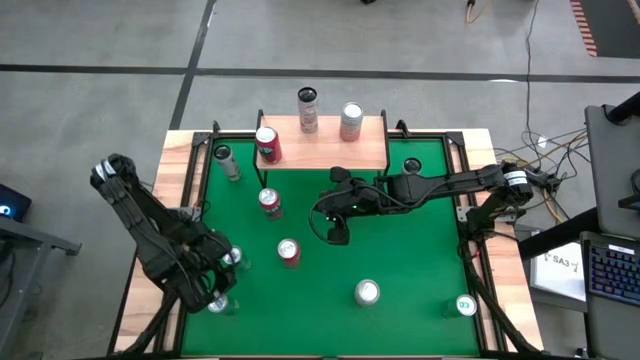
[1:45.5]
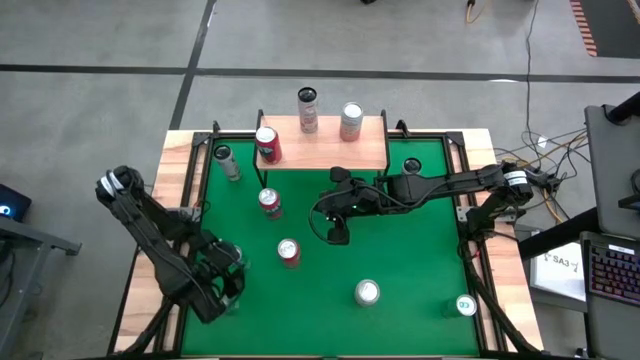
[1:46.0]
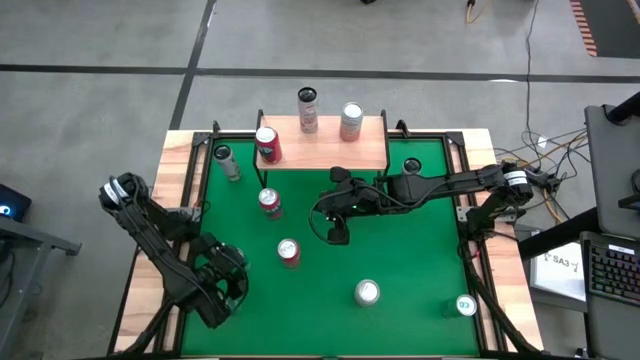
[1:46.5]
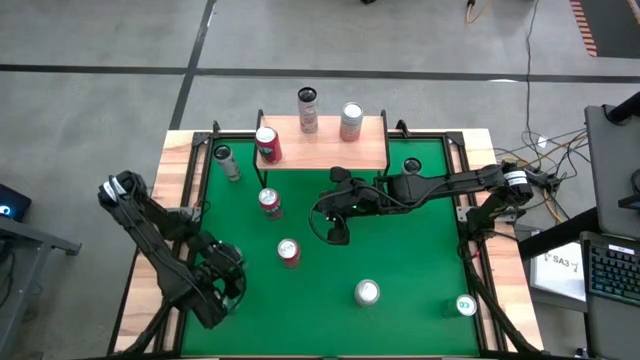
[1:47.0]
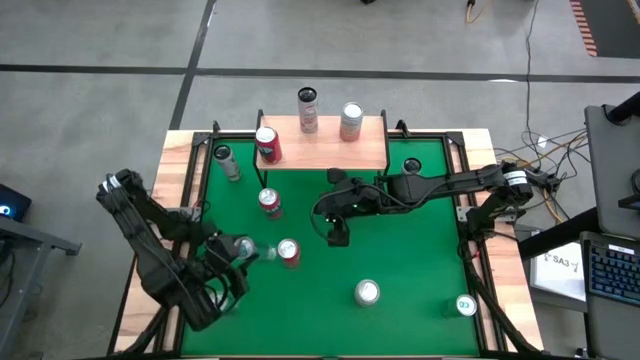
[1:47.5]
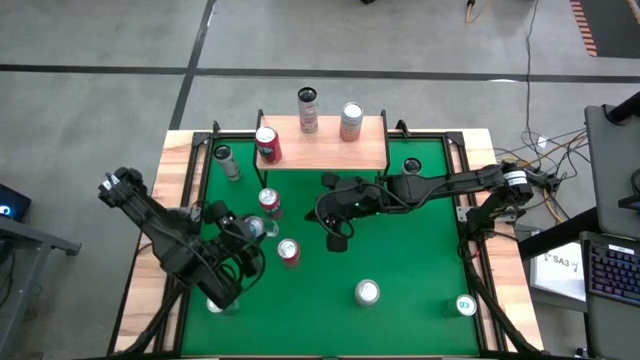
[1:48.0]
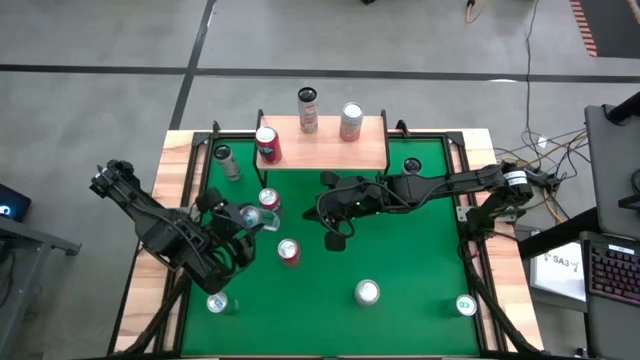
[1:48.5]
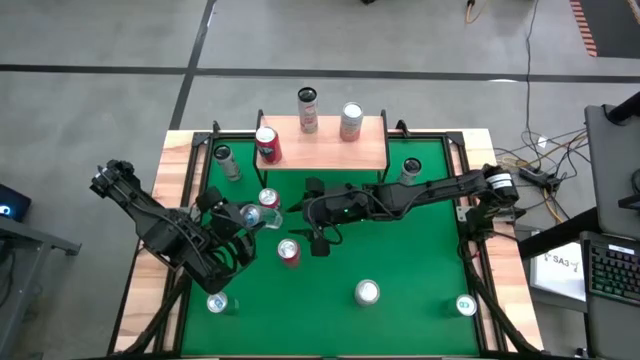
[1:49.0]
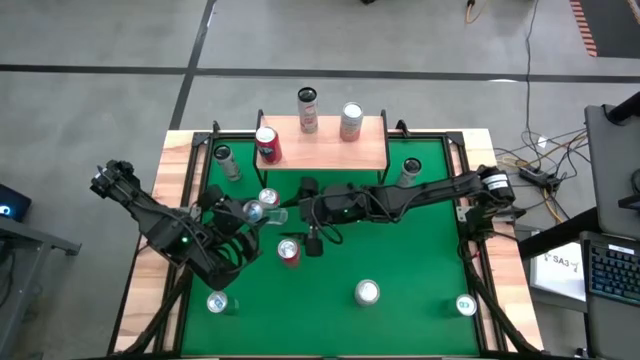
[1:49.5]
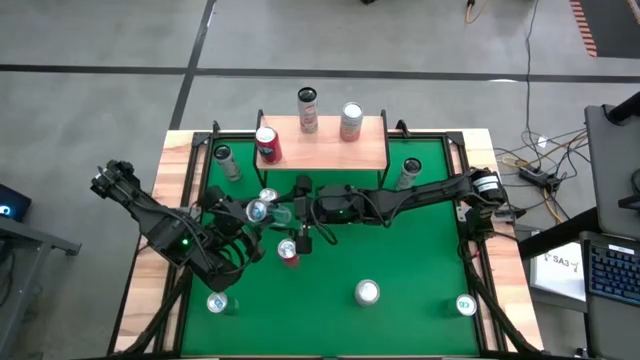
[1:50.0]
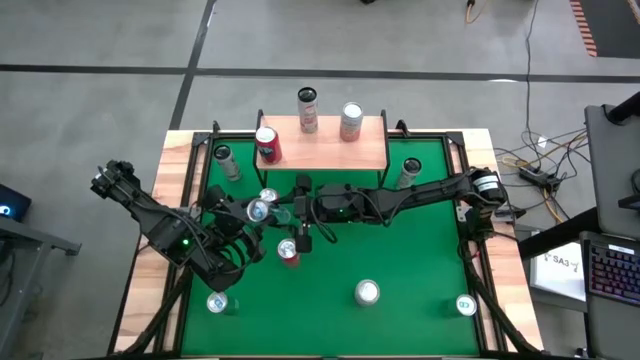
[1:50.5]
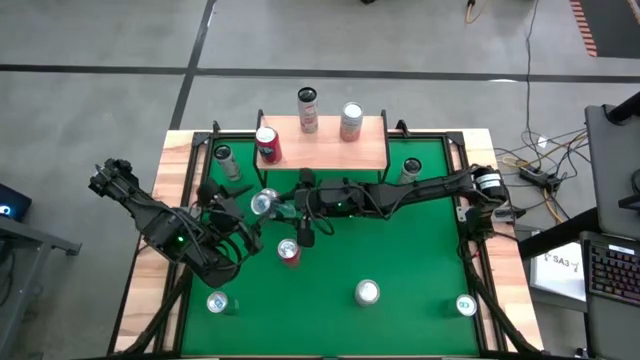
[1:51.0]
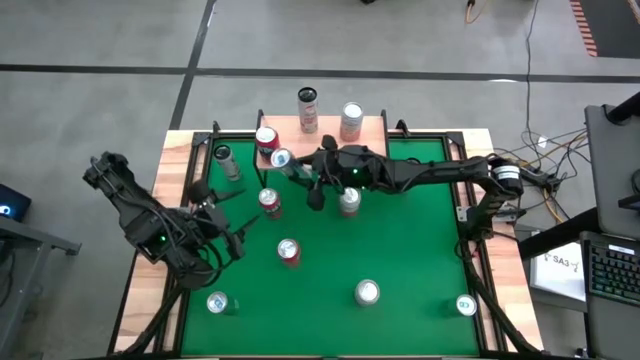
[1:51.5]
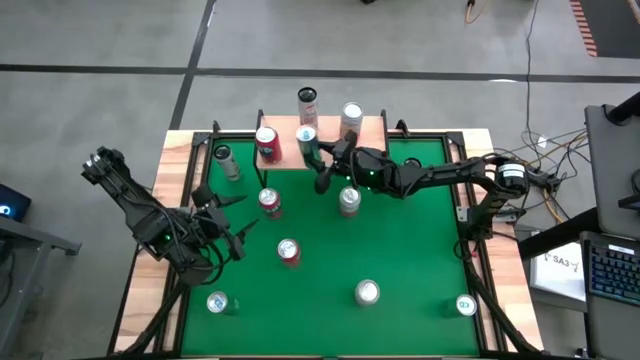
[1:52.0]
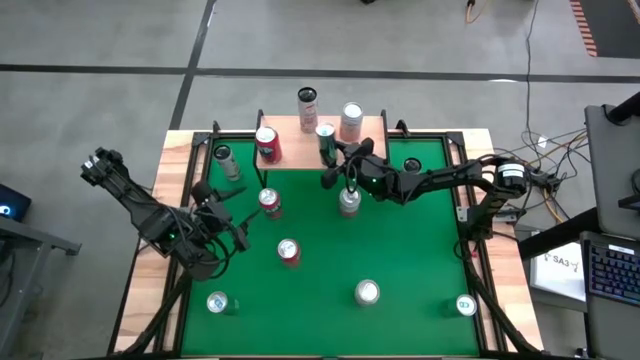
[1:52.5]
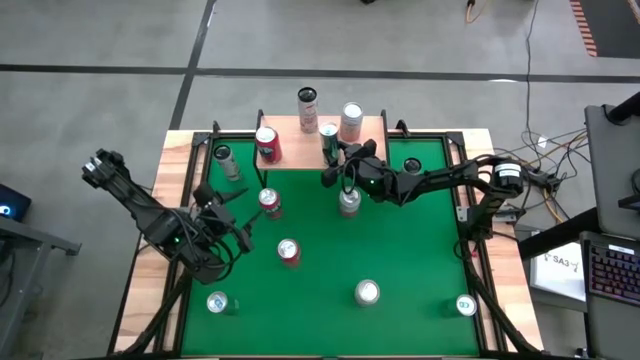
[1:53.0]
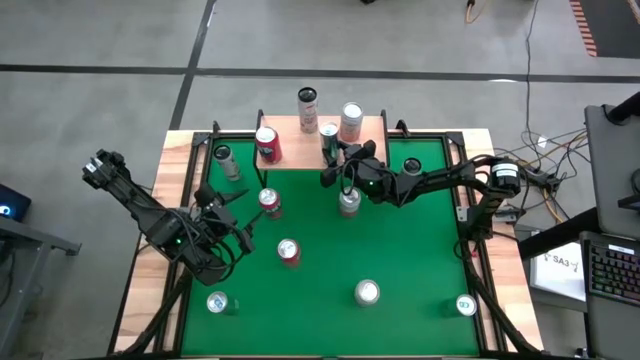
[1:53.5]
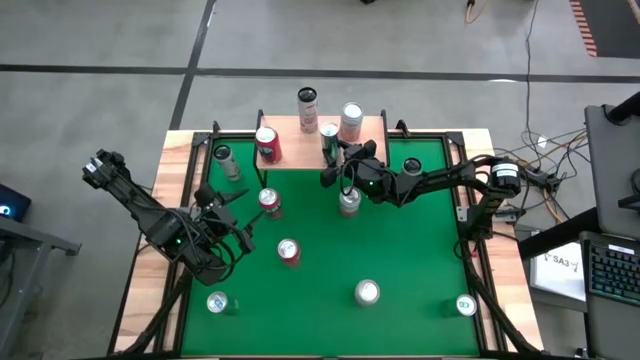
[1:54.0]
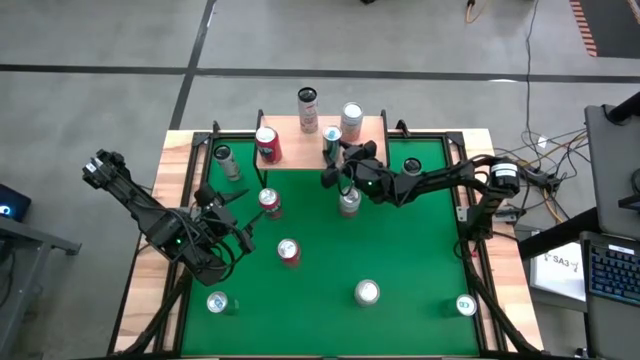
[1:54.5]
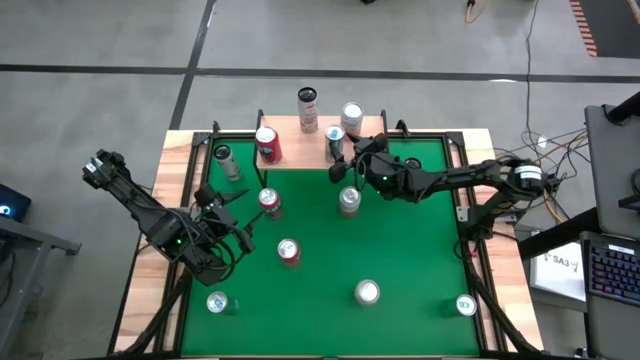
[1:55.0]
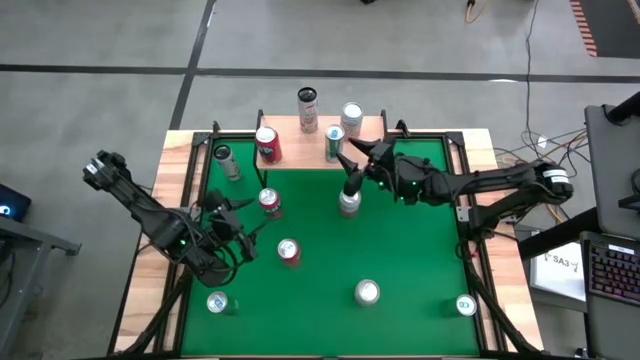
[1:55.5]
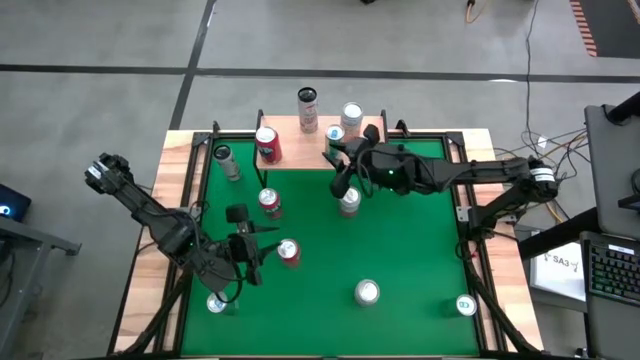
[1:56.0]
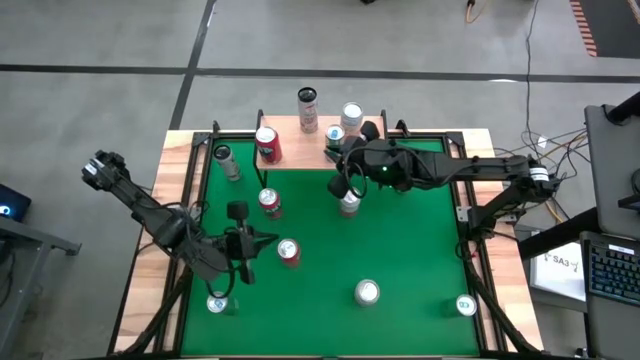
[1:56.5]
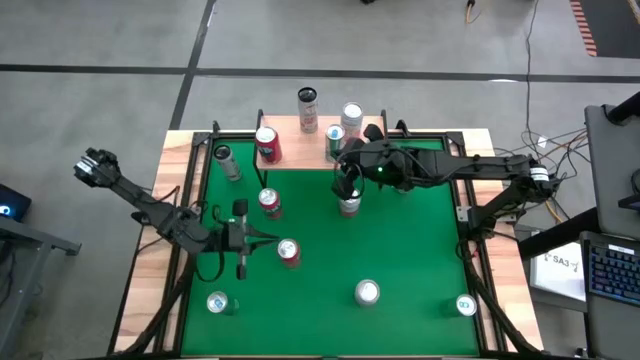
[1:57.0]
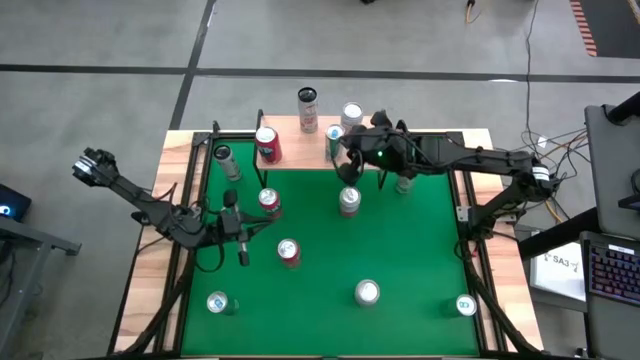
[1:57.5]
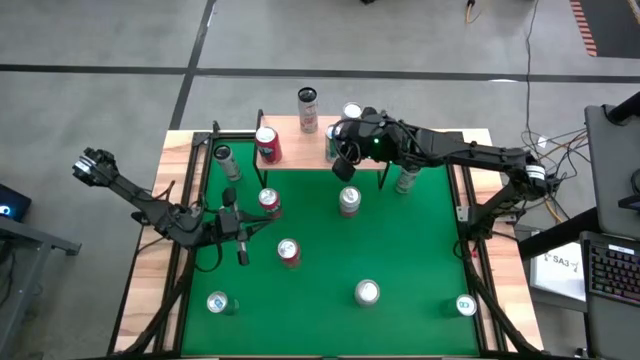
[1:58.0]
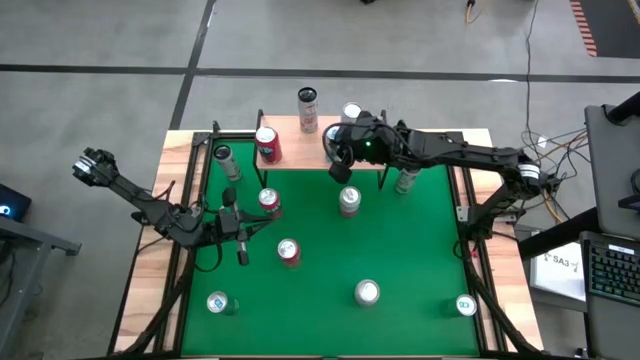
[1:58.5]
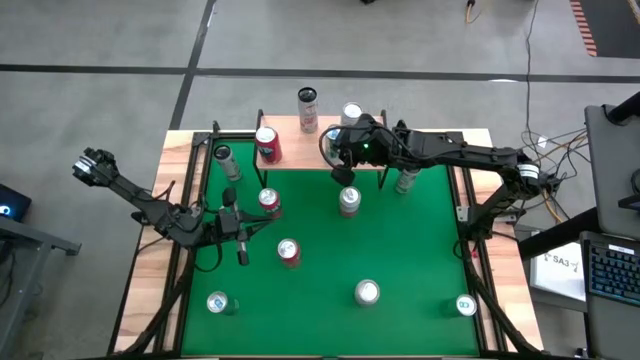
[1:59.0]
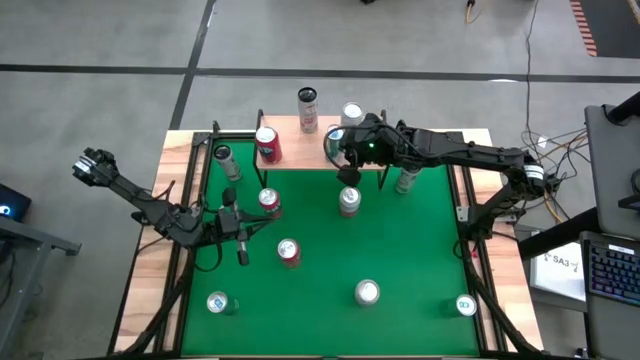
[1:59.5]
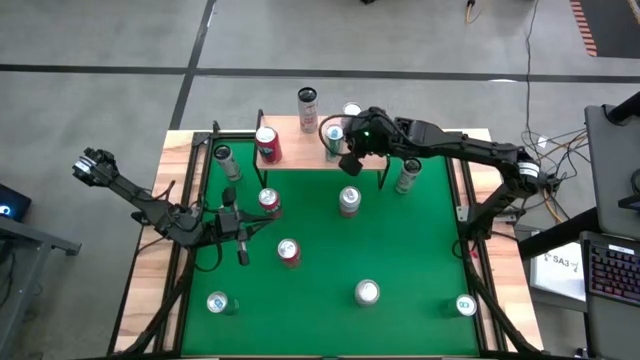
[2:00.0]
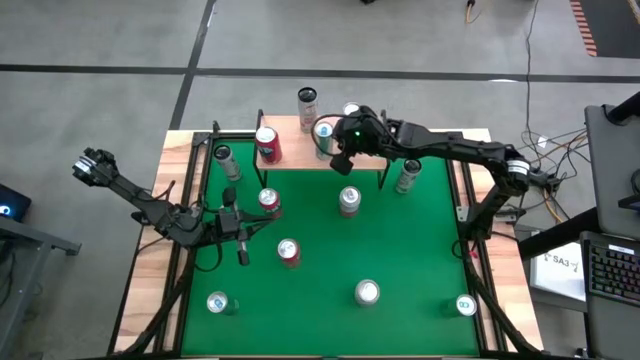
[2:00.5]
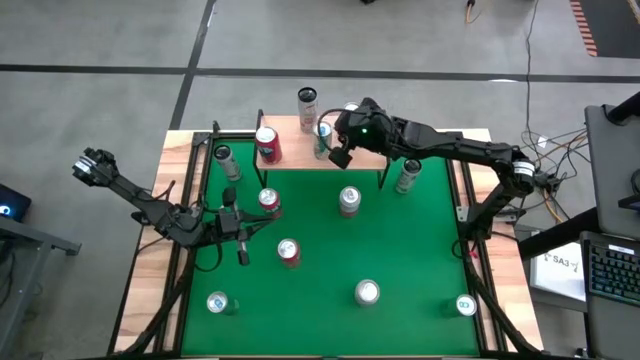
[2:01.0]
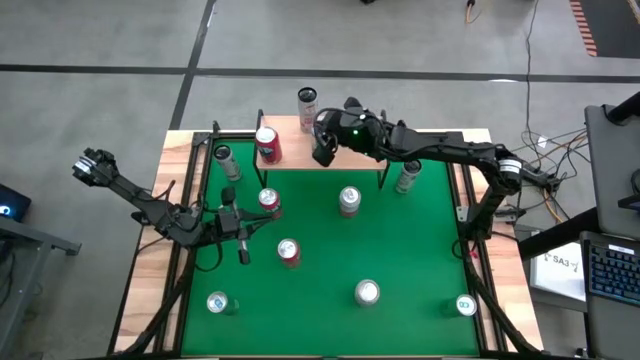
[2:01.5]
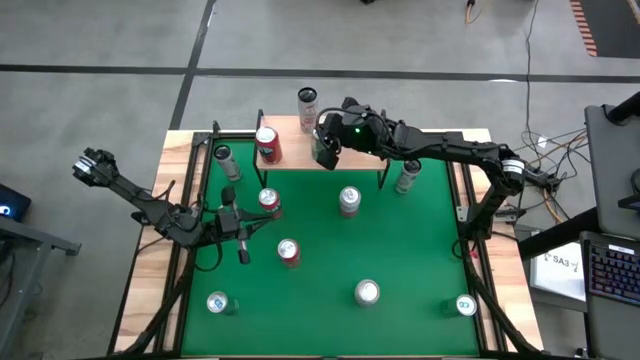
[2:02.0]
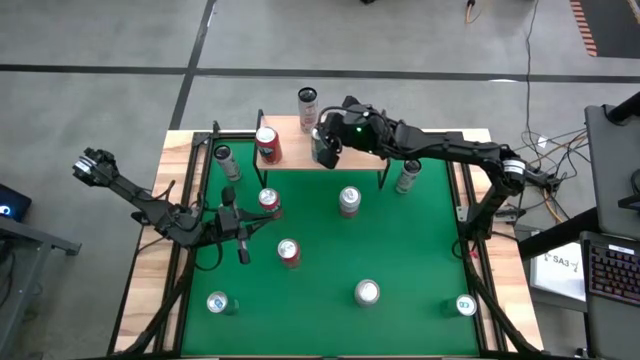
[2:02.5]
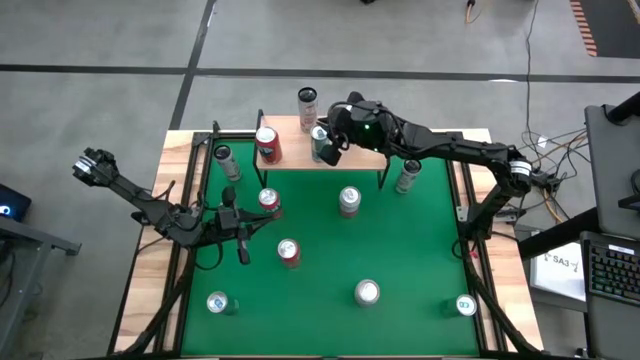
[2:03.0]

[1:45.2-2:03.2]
Task: Place canned beverage on shelf
Put the top left blue soda can on the shelf

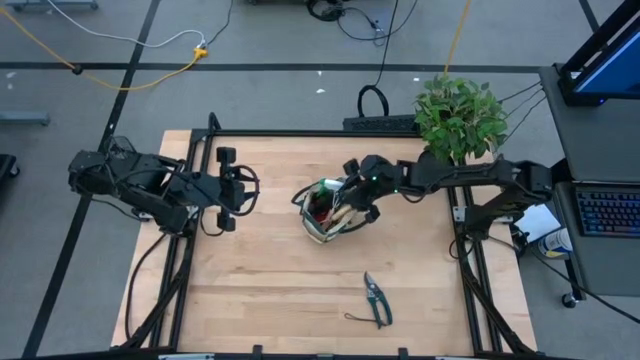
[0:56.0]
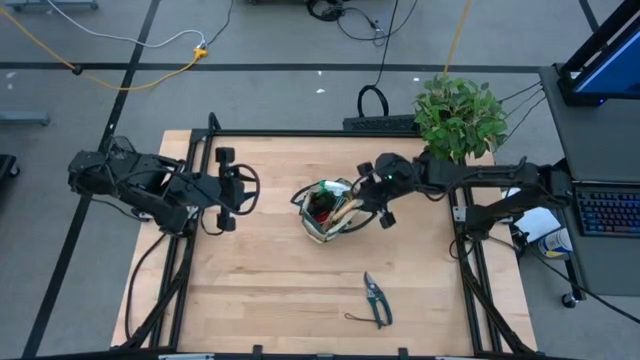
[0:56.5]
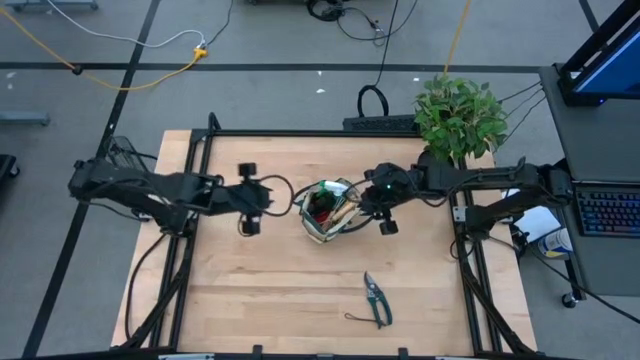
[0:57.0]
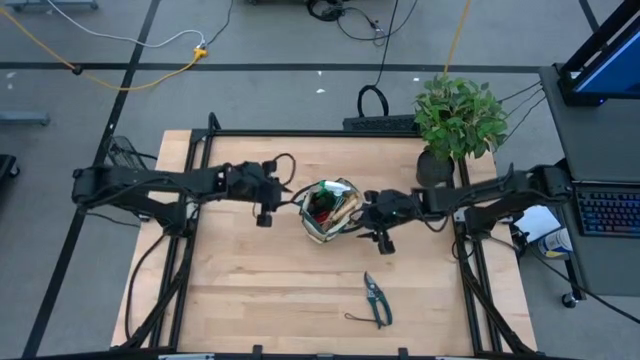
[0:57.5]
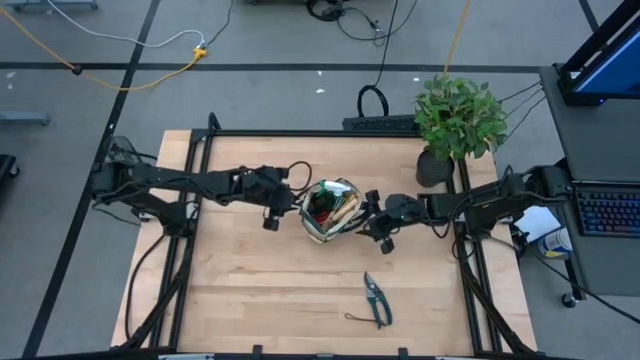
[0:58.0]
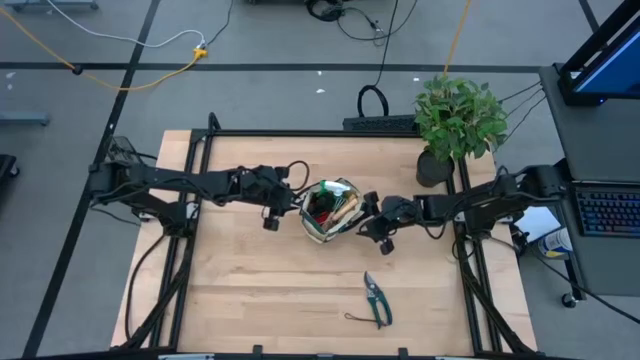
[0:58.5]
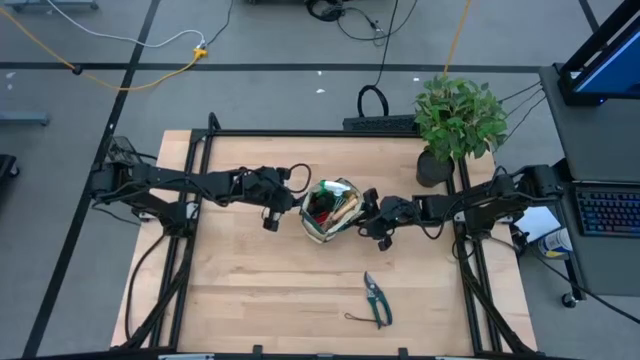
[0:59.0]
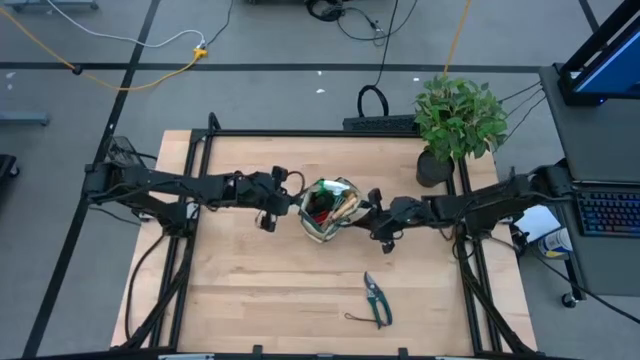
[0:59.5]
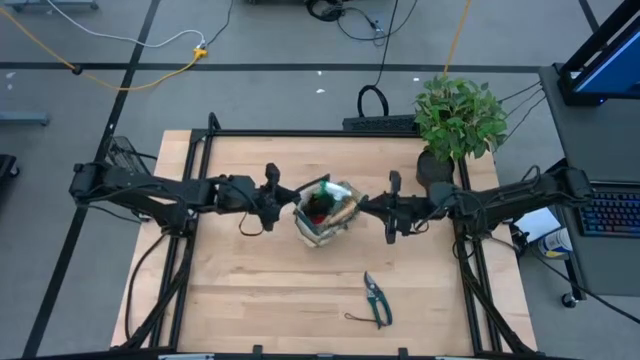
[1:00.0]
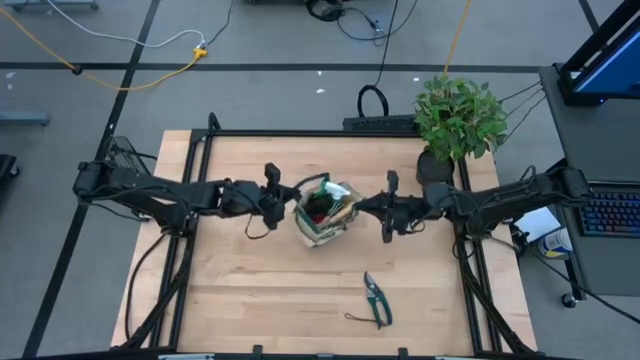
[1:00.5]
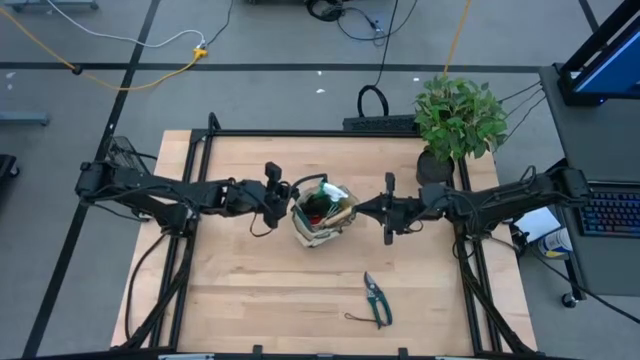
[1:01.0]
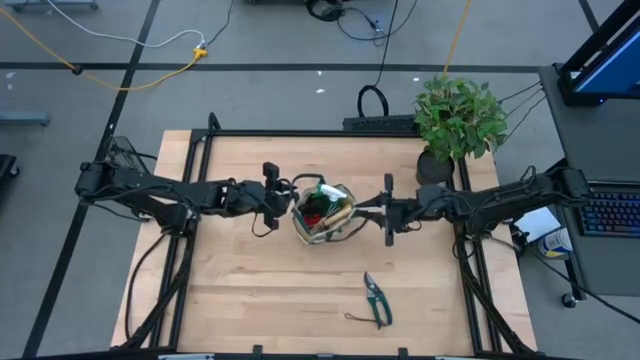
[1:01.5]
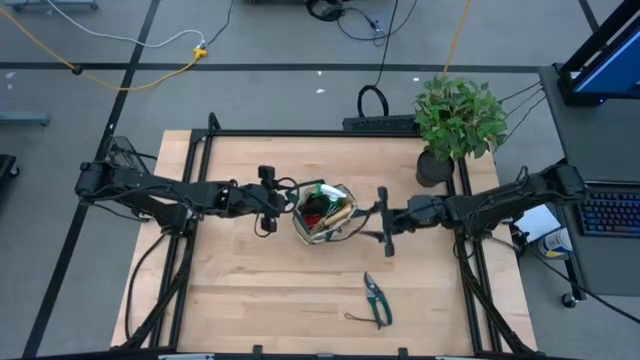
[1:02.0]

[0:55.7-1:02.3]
Task: Pick & Place Garden tools in Gardening bag
Adjust the green gardening bag
